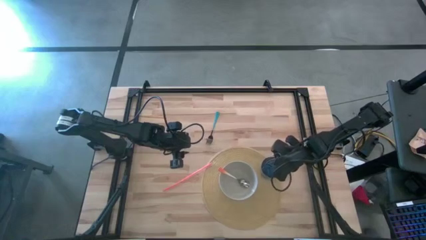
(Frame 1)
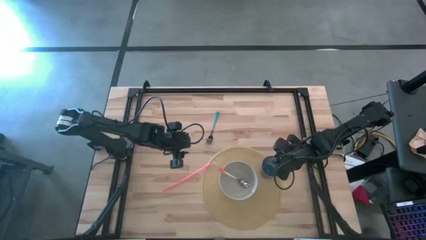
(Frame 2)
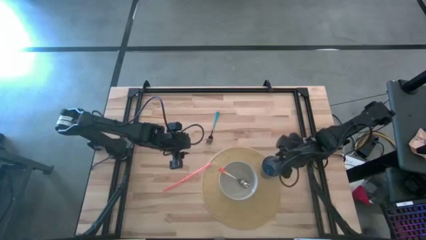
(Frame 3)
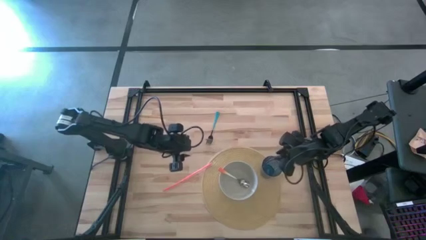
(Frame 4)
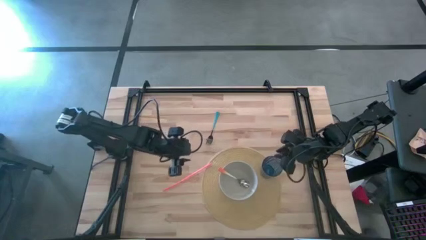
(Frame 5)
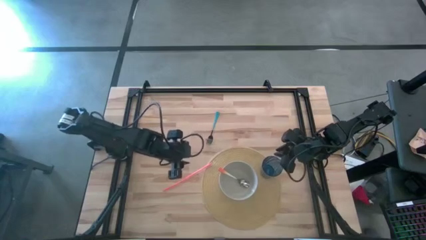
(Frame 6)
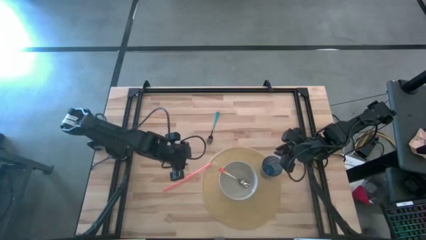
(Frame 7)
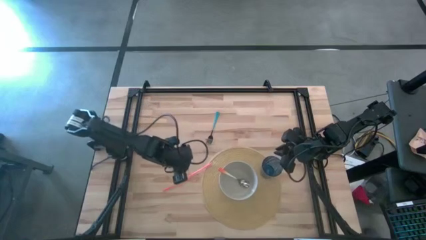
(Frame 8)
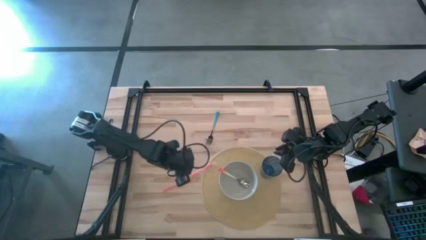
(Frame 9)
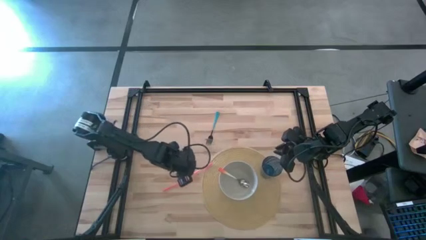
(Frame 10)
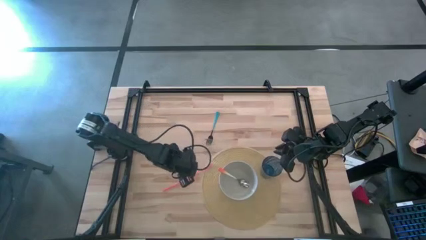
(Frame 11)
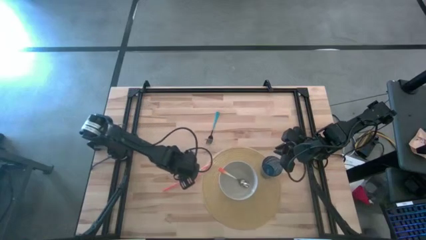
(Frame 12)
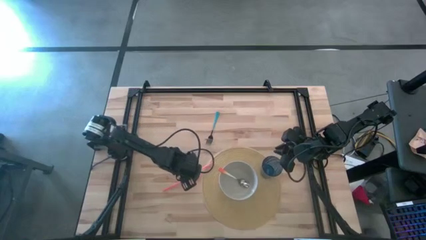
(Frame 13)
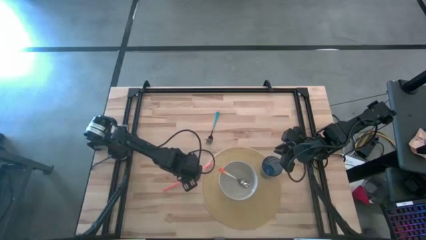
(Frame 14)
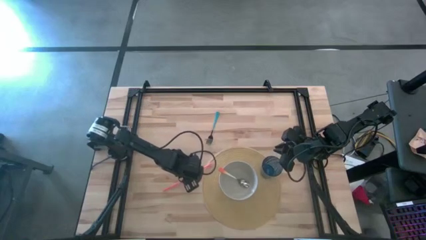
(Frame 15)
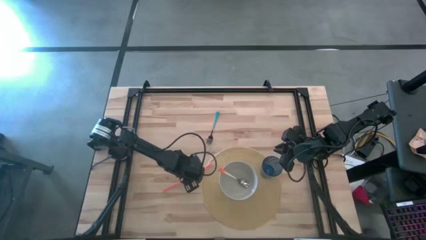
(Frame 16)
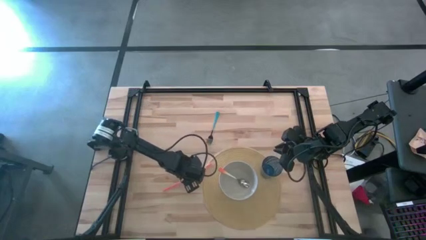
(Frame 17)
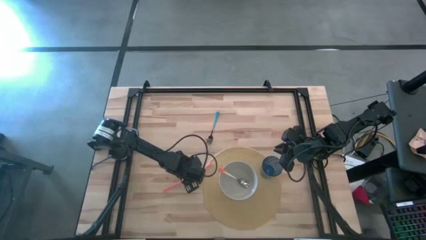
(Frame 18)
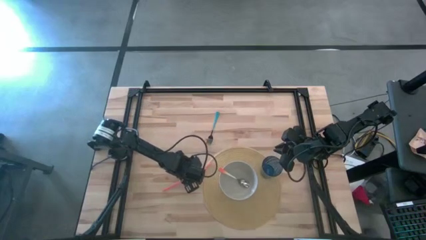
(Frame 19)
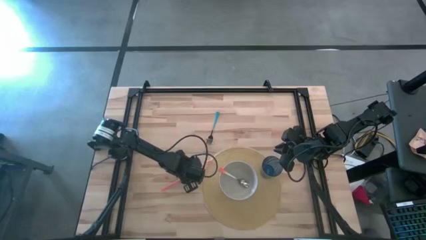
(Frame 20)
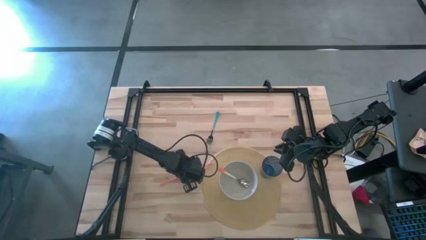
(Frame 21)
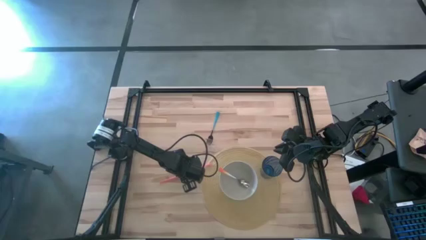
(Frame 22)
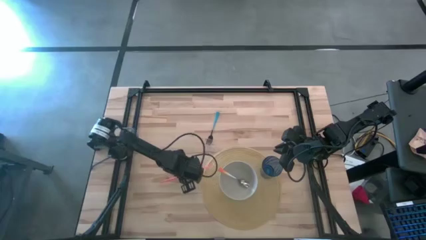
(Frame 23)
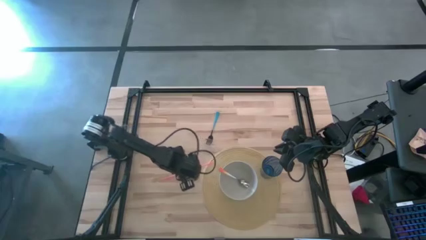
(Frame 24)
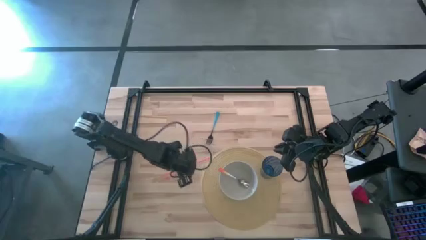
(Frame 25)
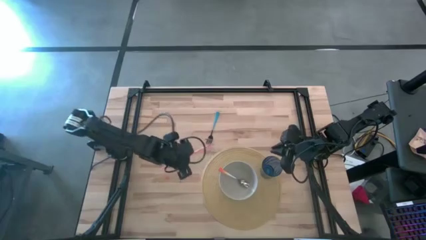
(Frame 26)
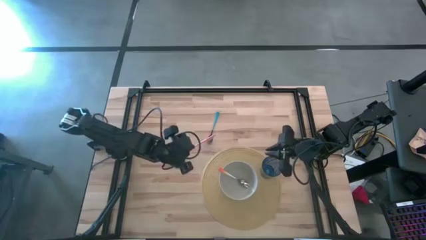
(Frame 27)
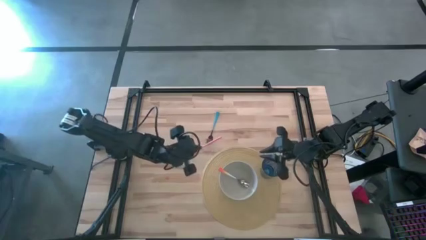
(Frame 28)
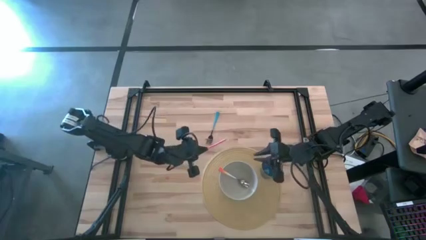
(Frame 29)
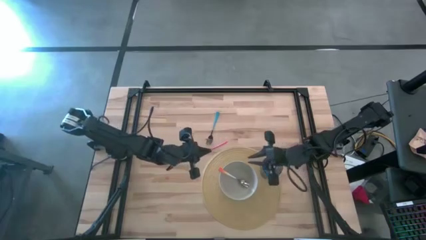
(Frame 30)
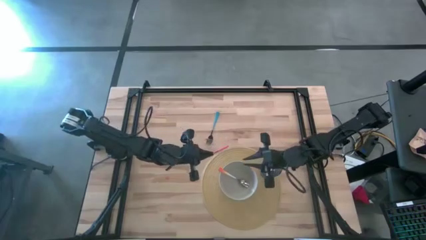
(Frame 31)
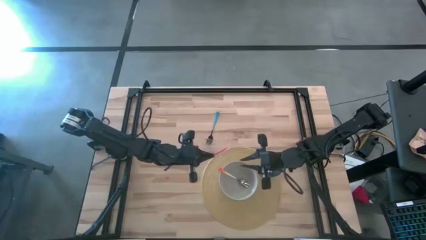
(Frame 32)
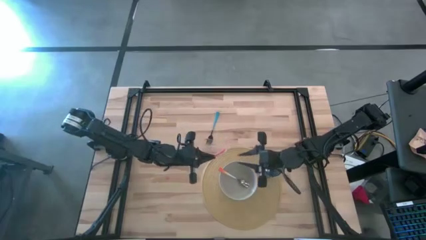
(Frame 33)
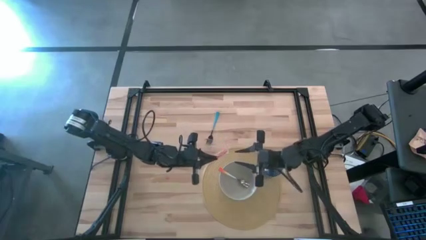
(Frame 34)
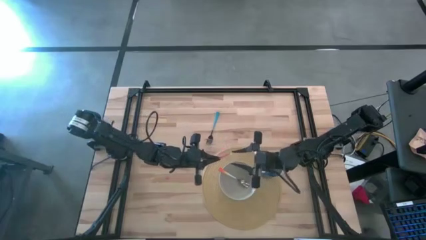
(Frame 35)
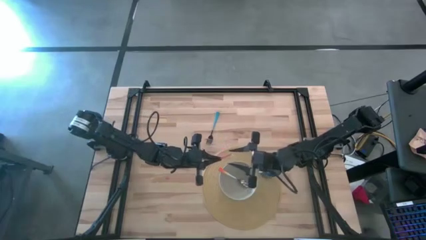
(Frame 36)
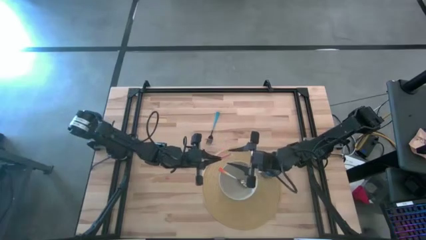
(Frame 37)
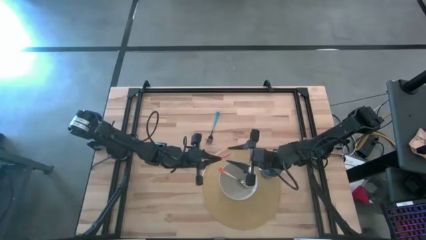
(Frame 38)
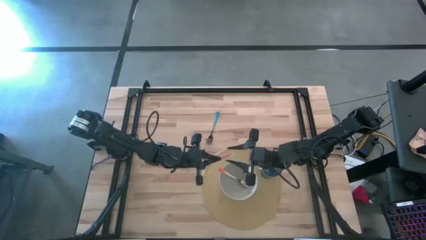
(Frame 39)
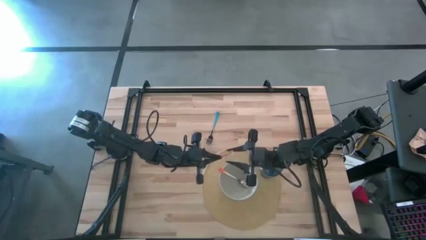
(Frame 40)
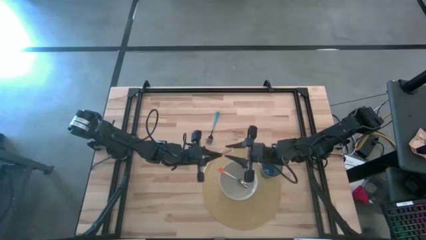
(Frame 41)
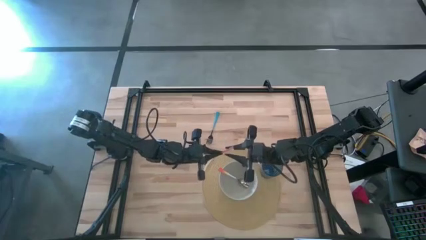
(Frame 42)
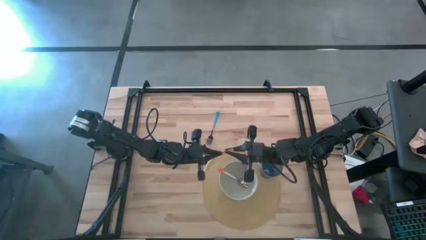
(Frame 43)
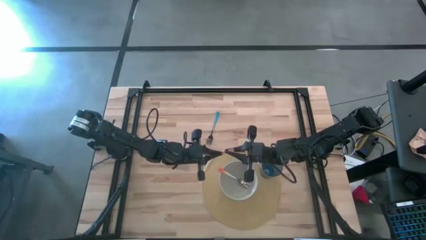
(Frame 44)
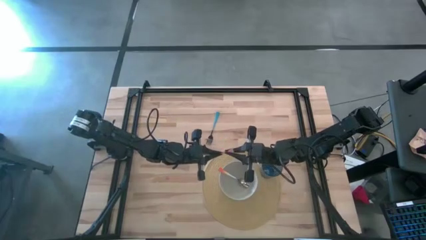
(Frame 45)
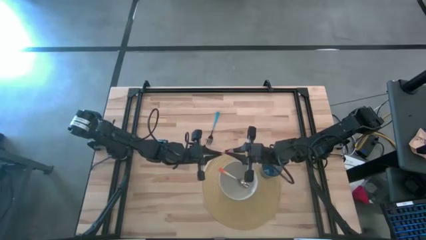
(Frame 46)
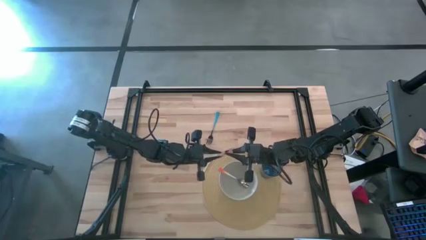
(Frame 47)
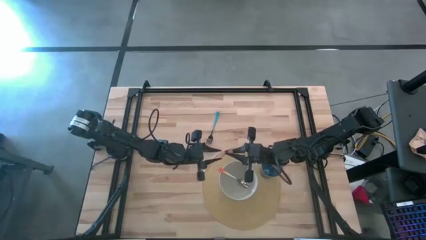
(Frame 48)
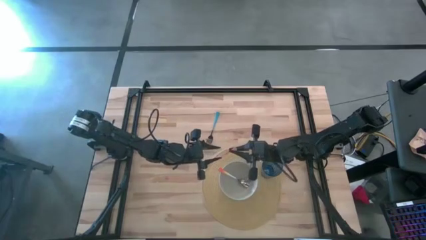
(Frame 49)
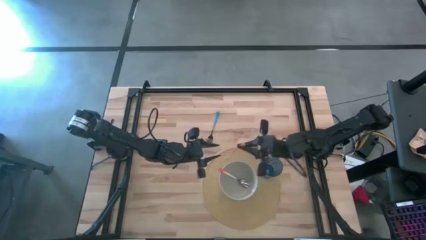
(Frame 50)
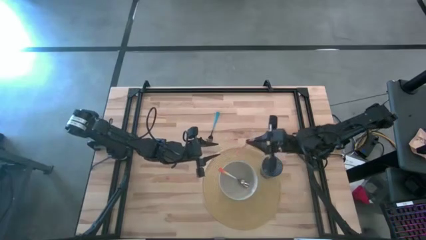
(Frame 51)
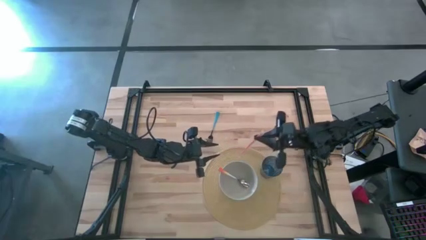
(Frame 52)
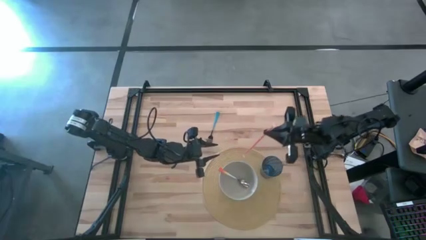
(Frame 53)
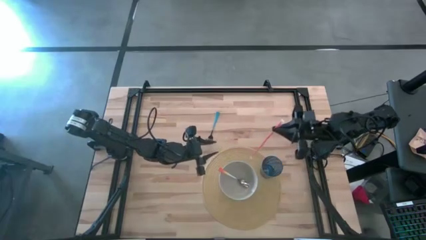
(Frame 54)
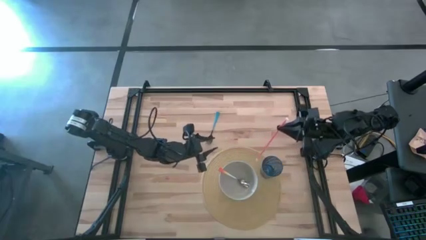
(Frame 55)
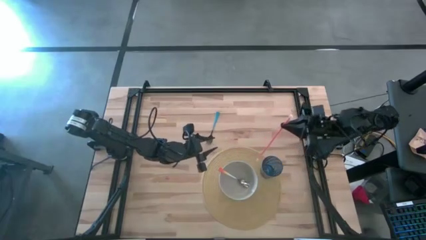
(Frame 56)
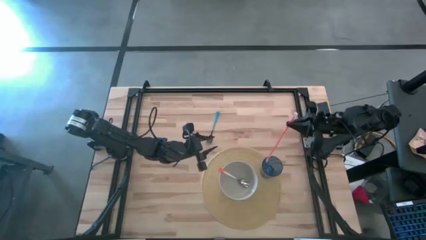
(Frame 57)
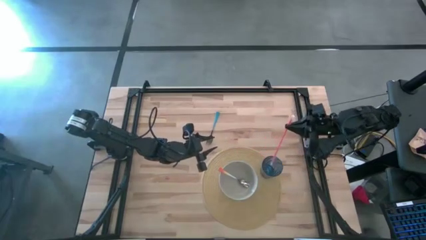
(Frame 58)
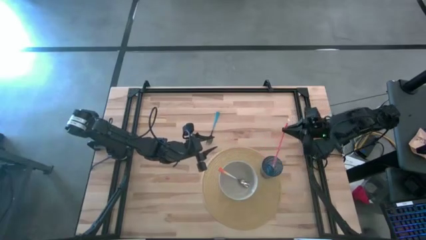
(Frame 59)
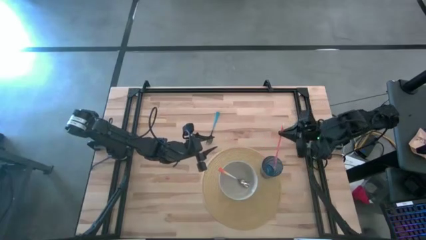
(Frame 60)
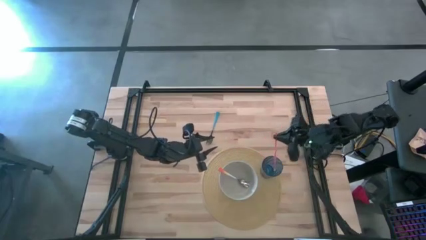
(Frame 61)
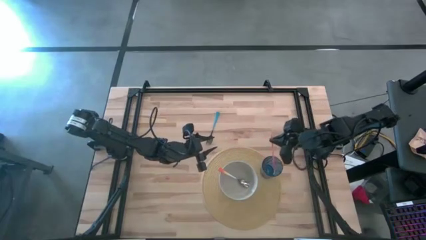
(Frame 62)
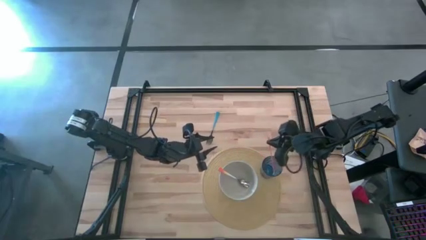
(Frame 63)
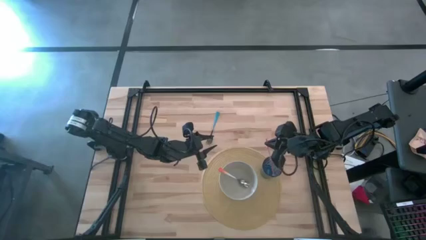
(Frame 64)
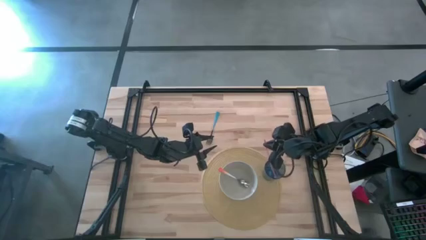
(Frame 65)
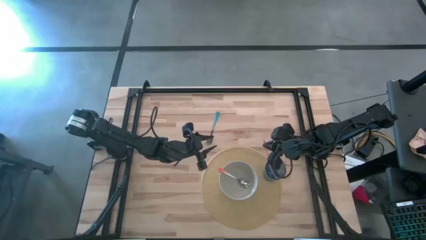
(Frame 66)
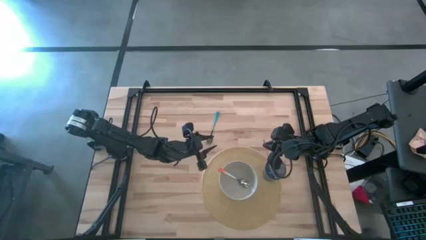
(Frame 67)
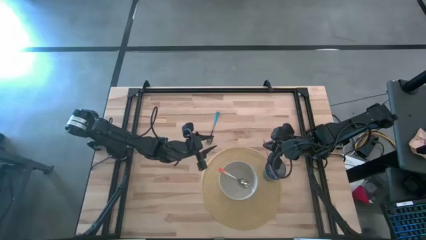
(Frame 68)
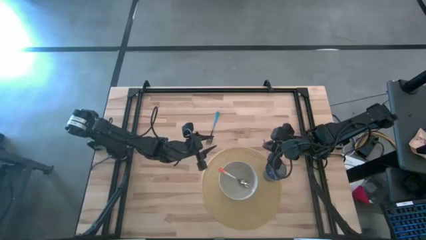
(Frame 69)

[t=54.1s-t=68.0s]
Task: Pick & Place Utensil
Put the orange straw into the blue cup

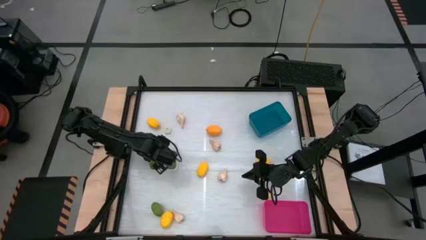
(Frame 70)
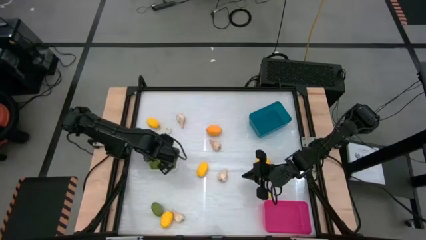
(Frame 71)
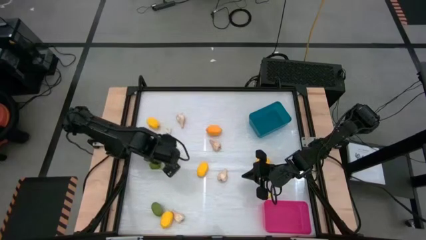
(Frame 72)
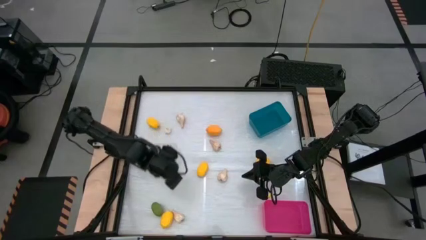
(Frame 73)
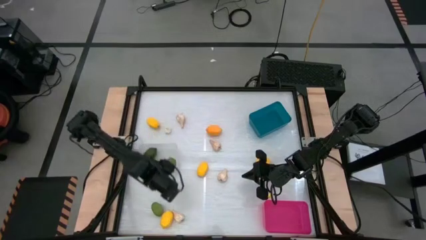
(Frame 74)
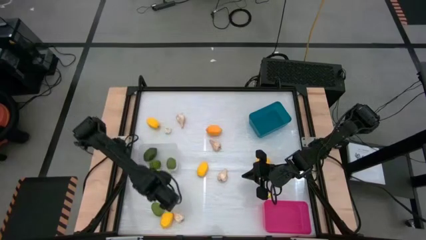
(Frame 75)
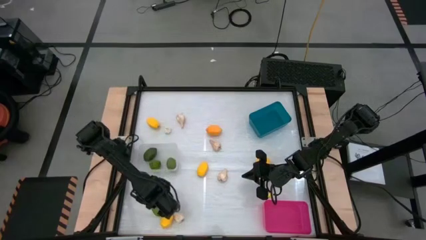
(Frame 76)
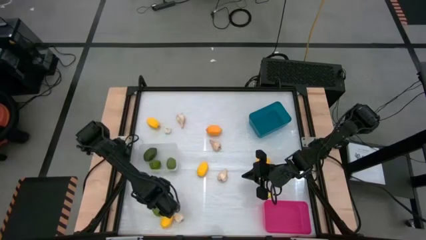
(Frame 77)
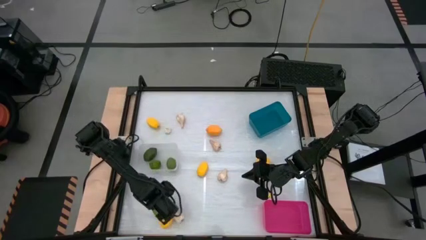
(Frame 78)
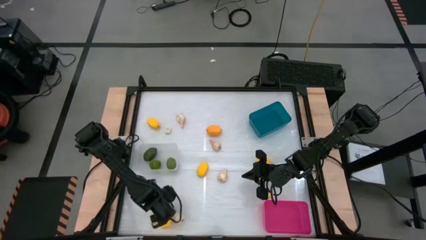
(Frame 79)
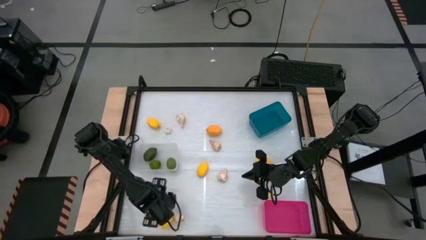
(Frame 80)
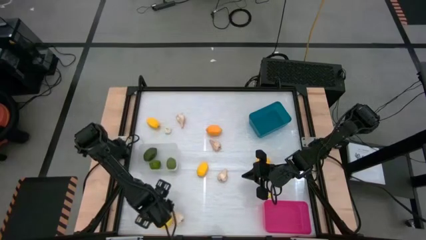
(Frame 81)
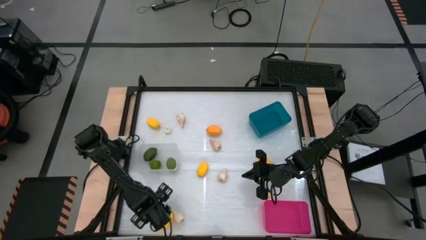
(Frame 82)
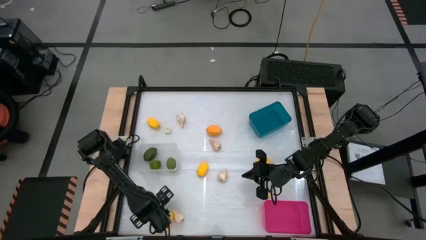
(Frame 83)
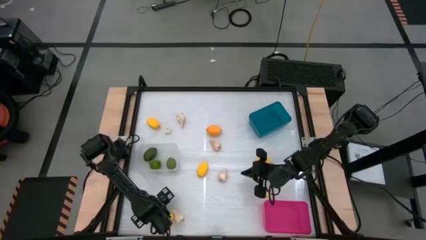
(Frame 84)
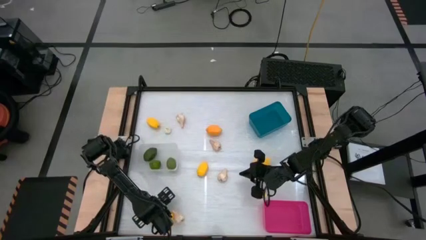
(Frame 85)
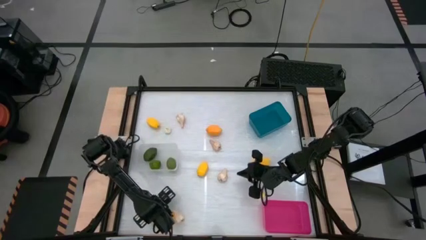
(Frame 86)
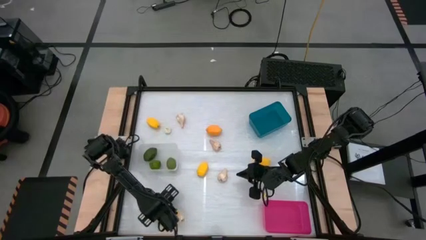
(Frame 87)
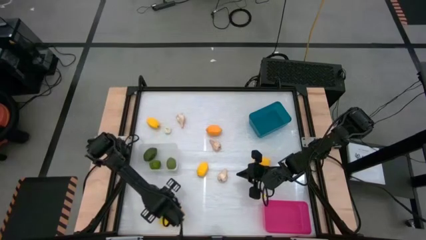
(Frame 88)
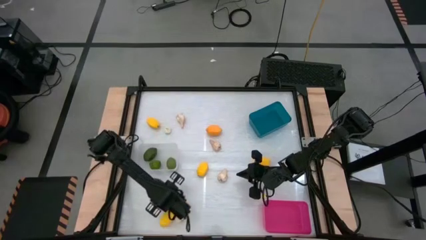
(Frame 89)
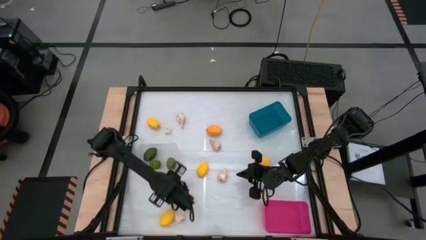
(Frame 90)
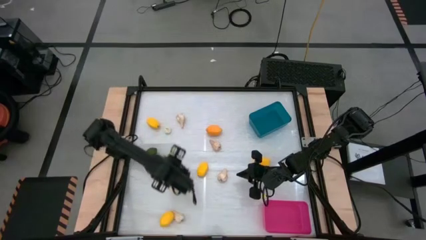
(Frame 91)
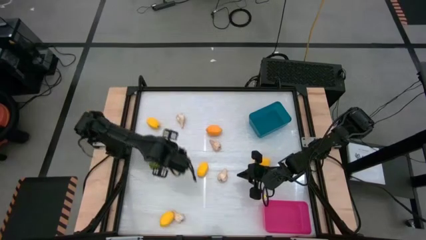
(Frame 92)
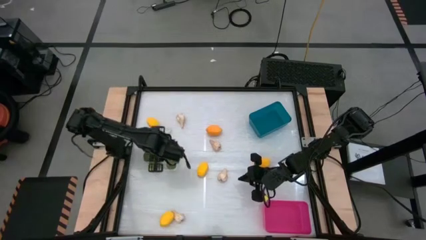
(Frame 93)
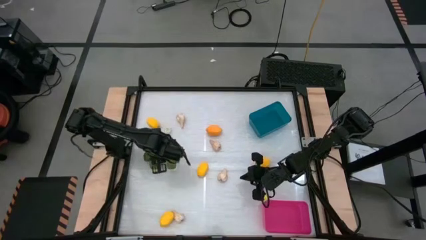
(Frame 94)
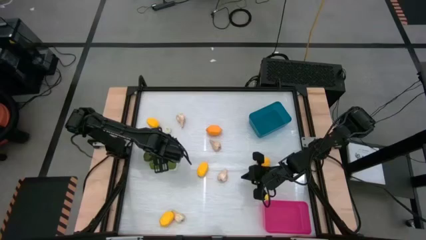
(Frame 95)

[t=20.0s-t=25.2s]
Task: Sort produce into baskets
Put the green lime into the transparent bin
